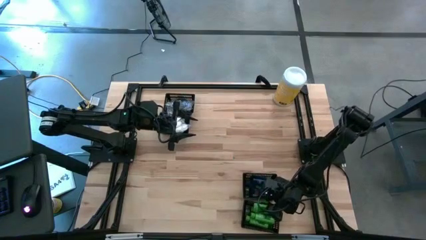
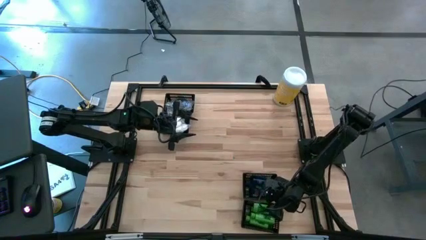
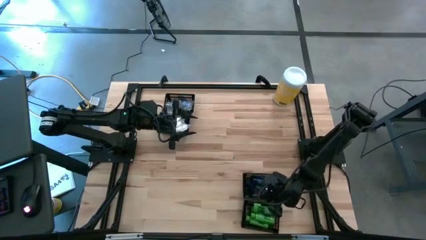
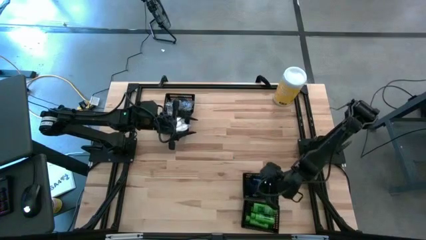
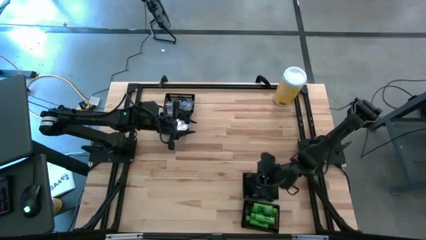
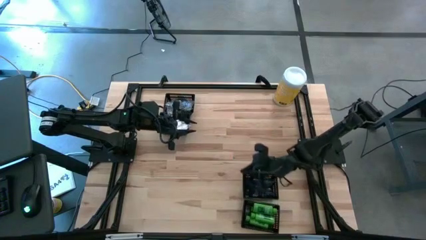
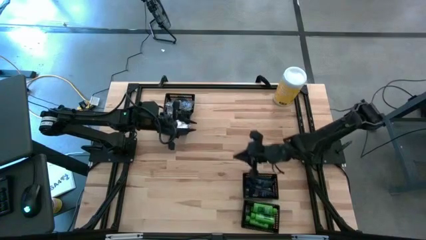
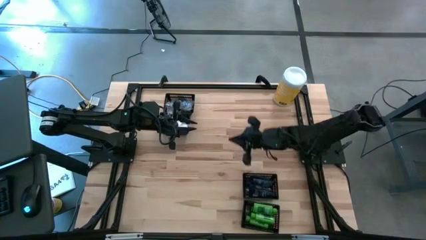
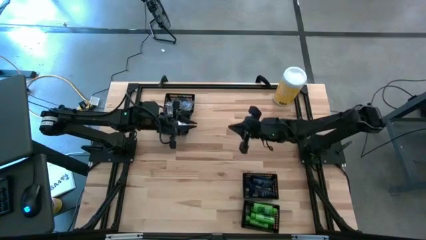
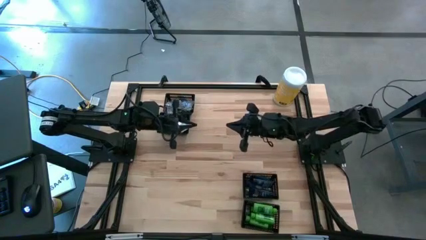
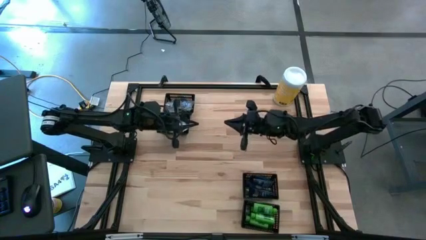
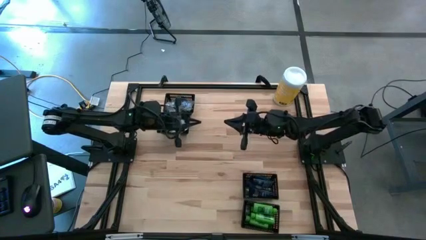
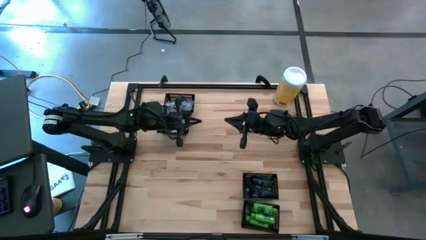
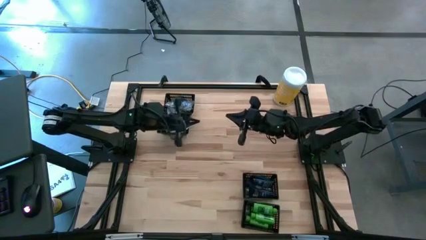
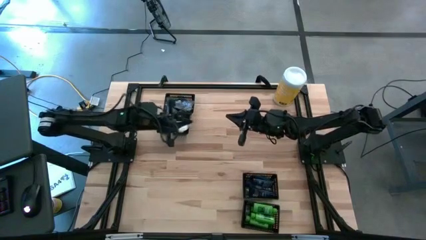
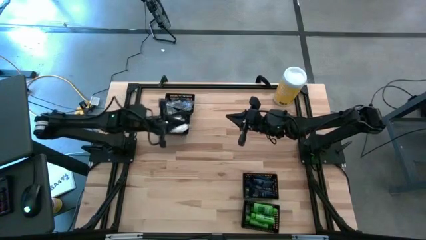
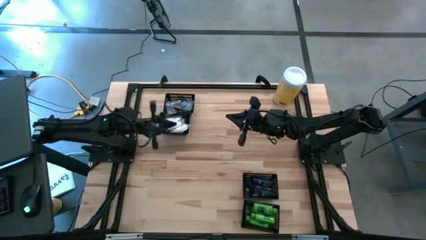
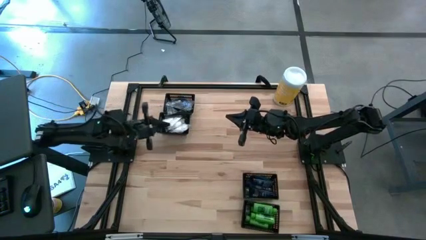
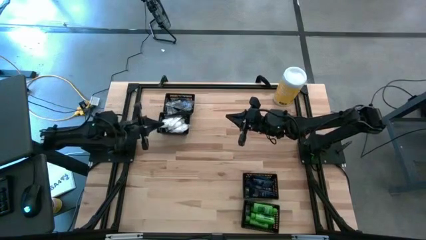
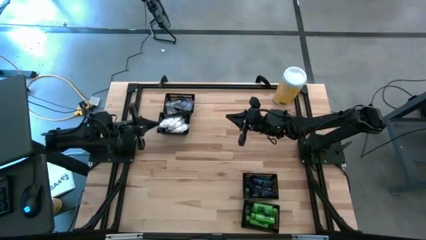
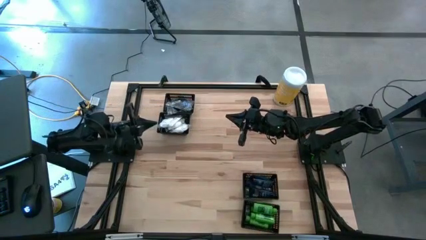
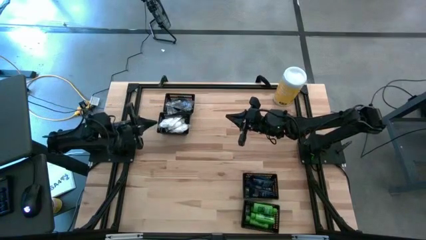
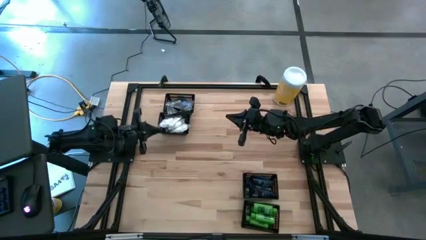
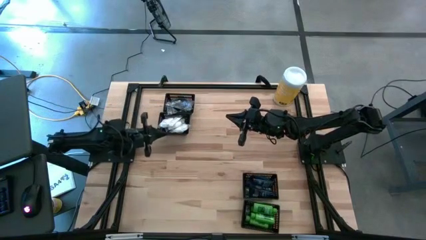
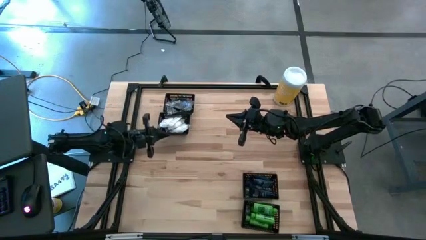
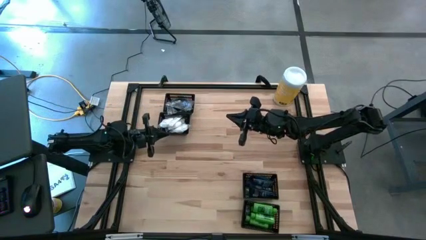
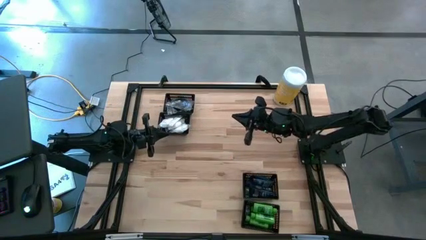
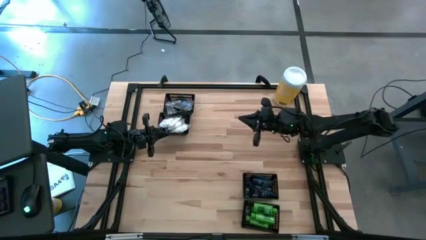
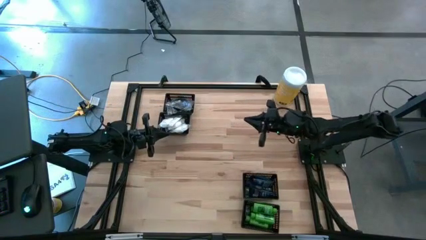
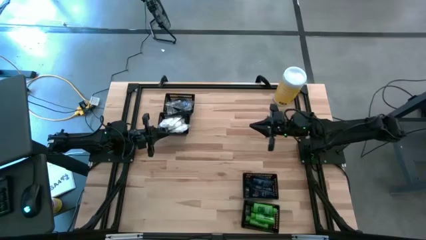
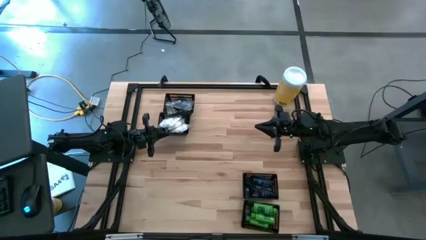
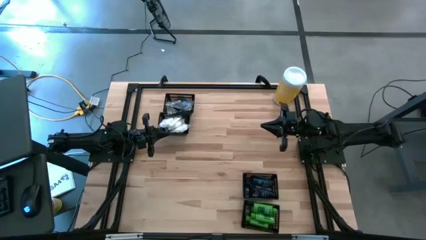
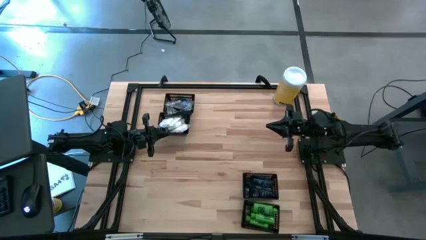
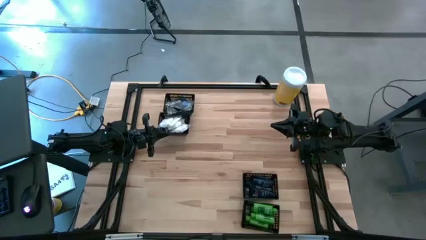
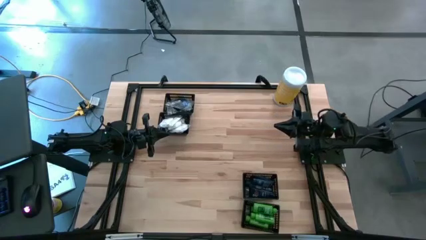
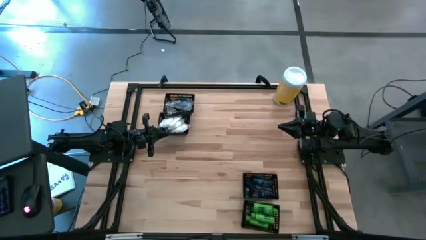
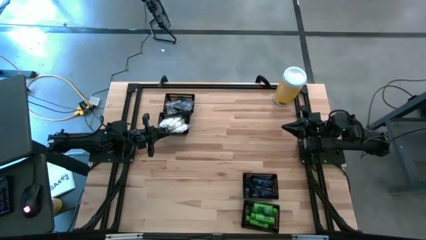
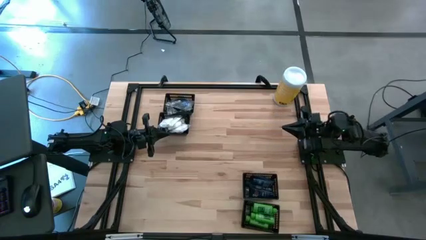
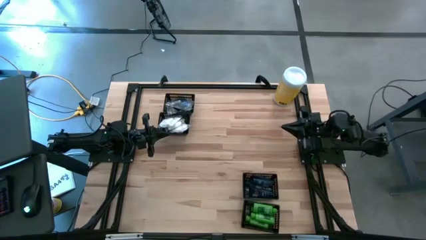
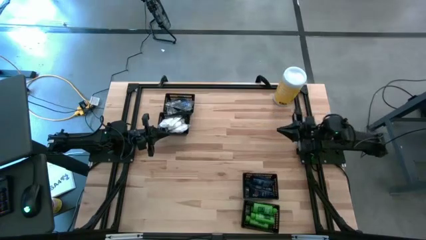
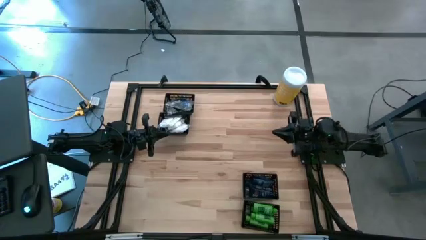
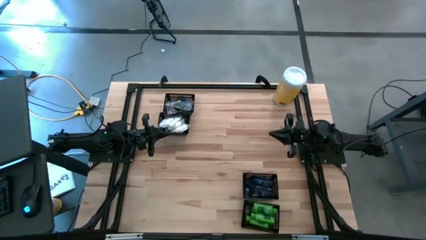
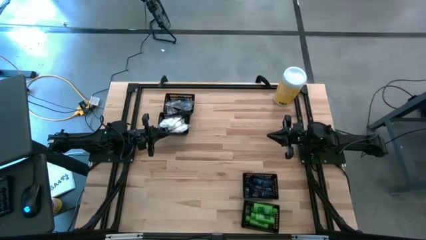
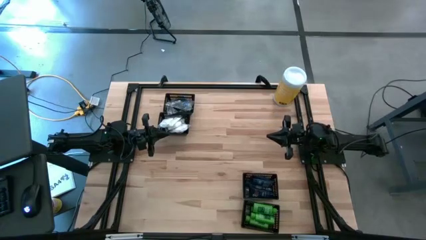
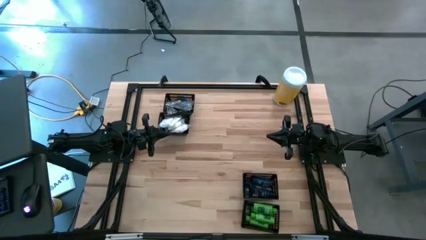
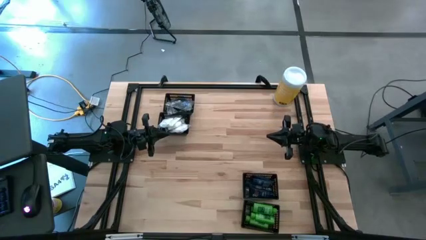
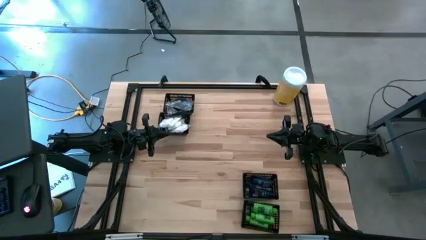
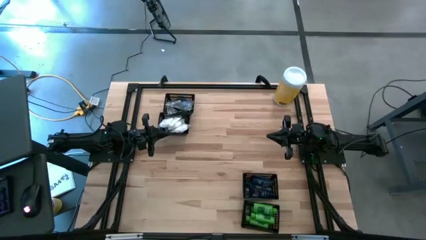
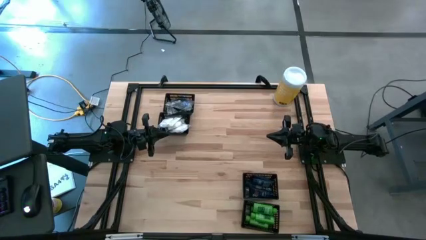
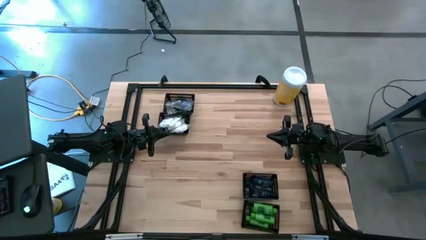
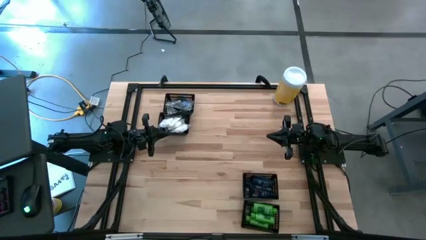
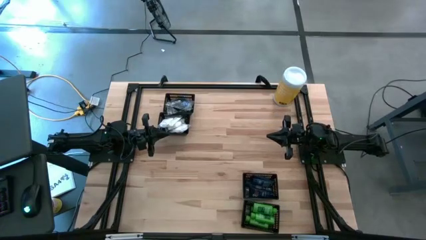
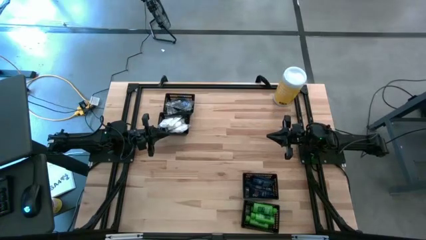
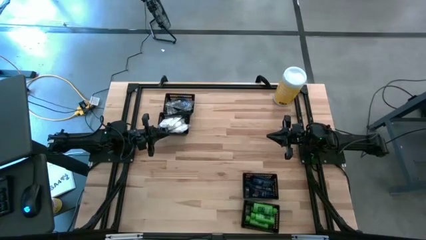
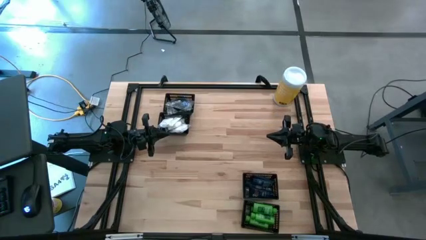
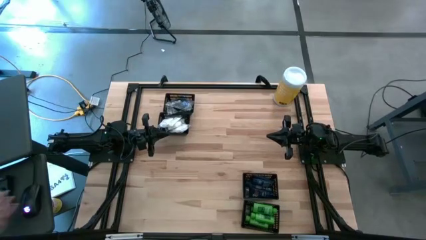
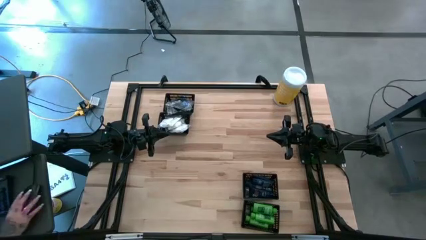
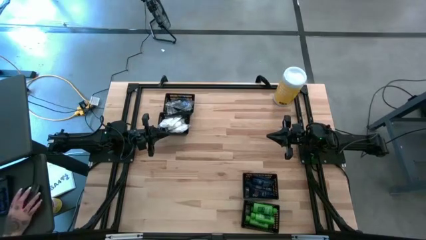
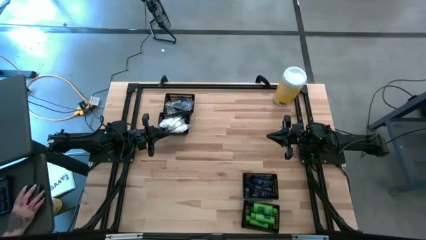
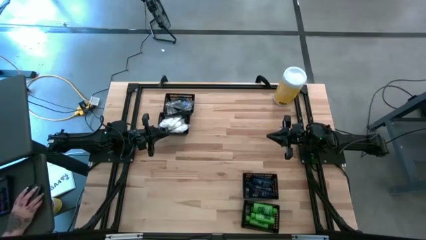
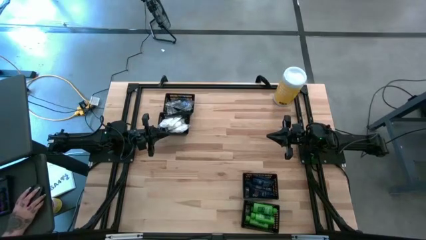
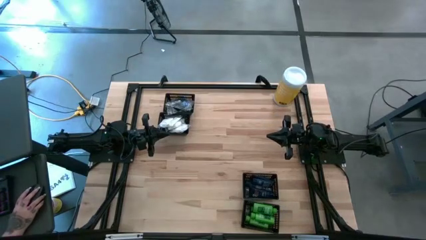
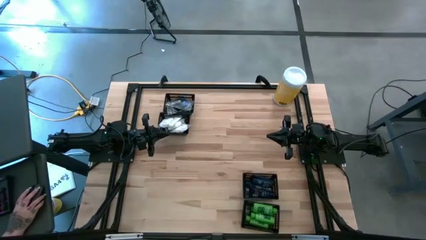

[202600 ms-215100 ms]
Task: Pick & Place Travel size toiletries
Return to Home Position
